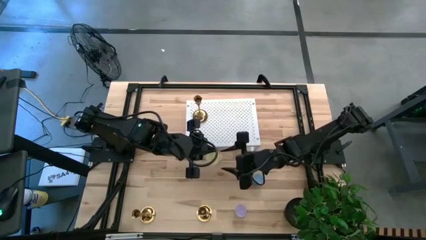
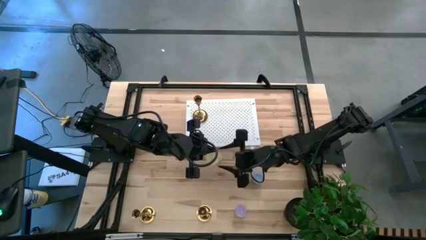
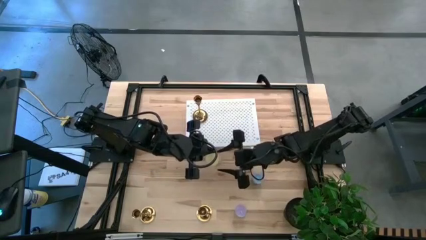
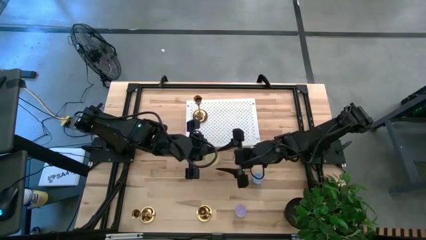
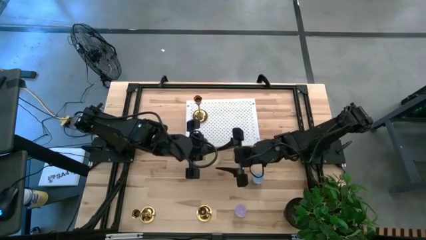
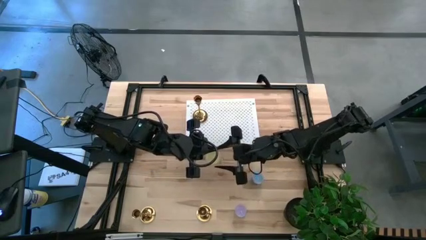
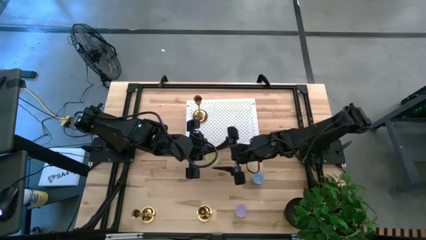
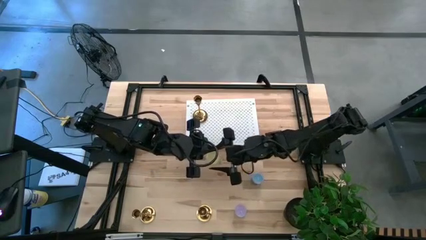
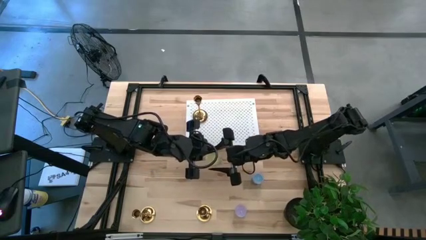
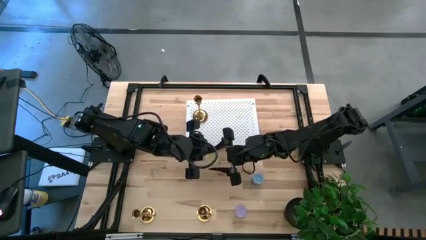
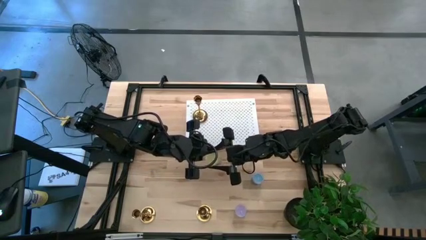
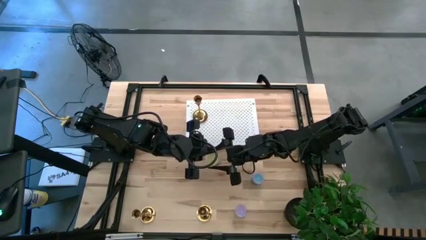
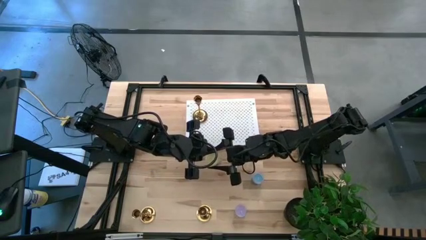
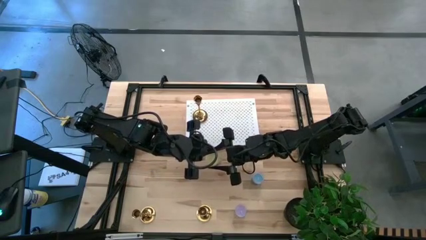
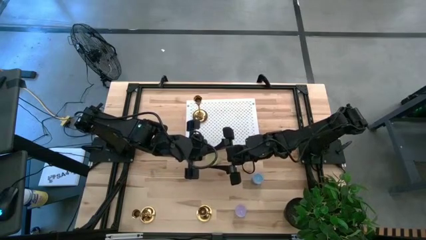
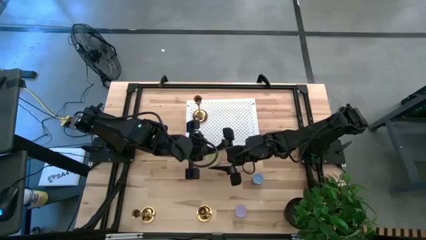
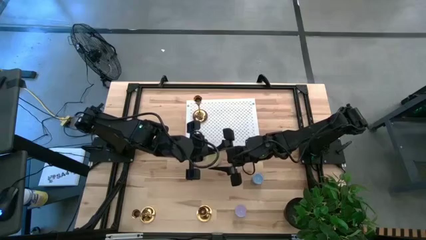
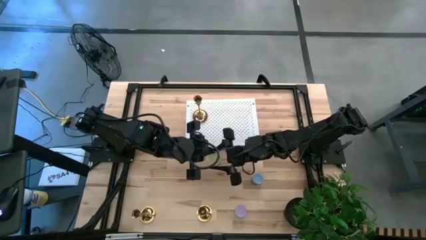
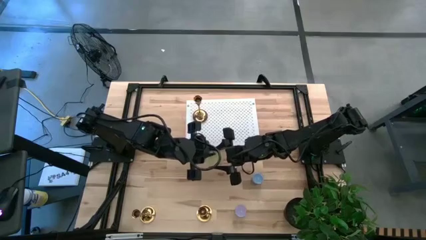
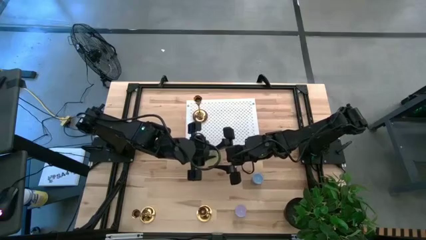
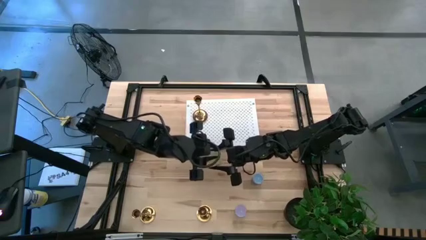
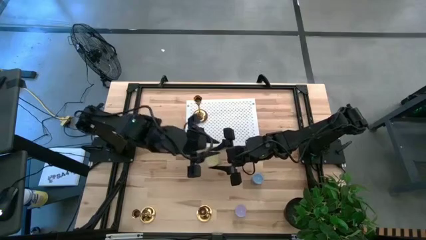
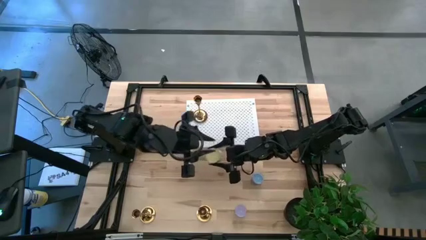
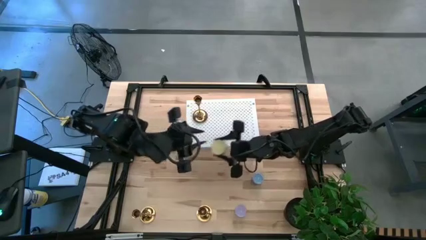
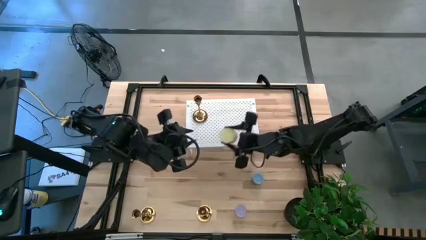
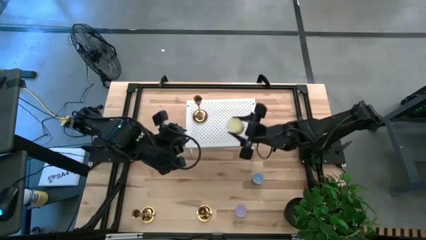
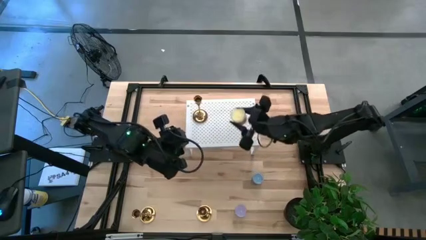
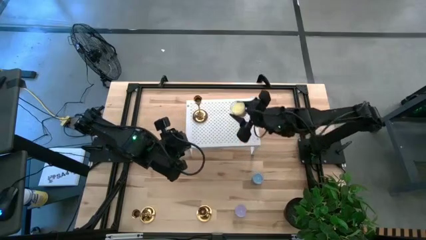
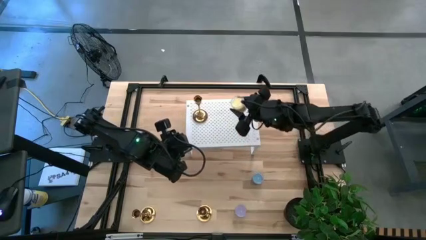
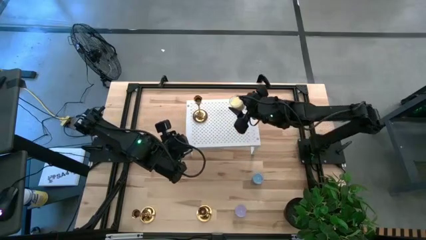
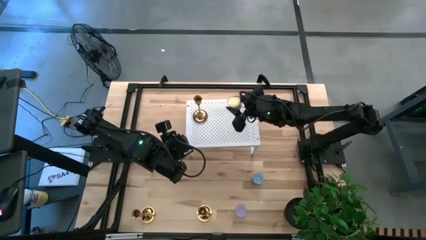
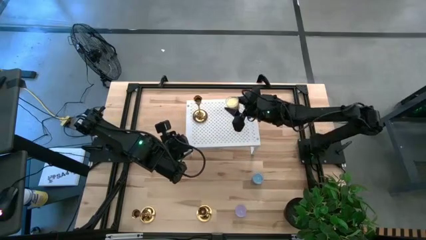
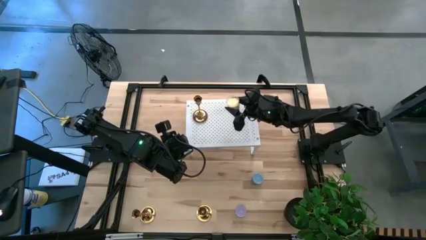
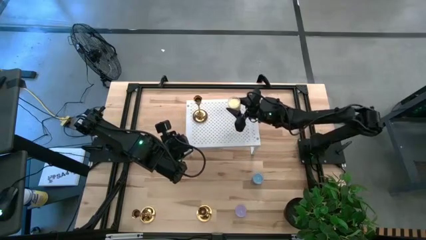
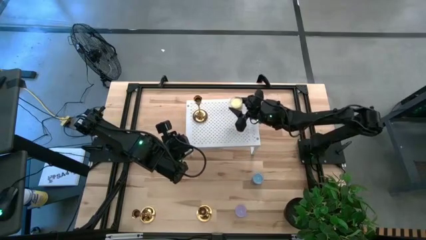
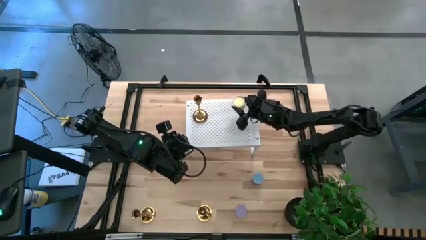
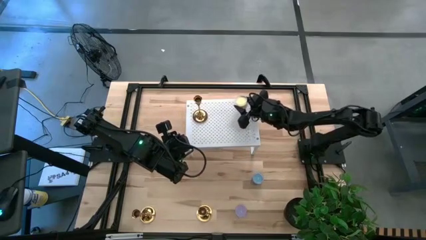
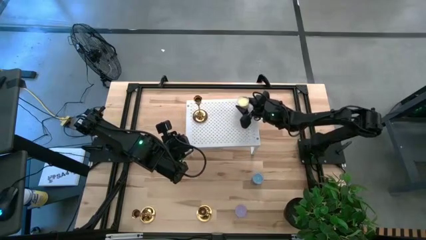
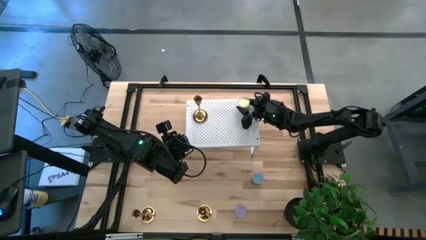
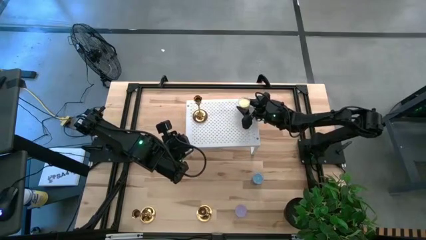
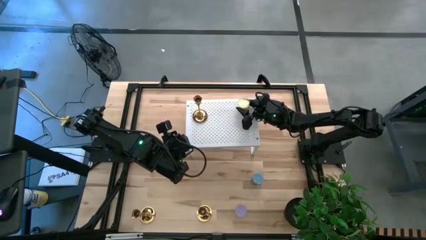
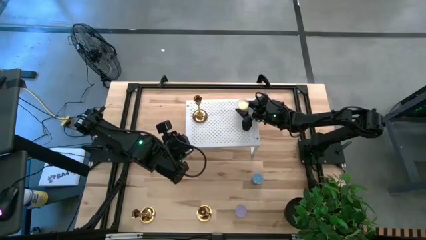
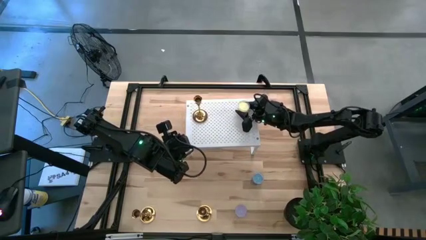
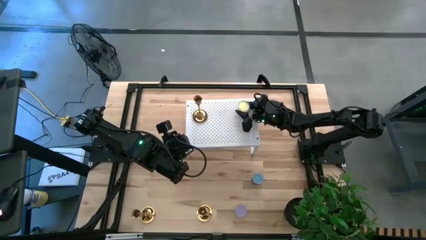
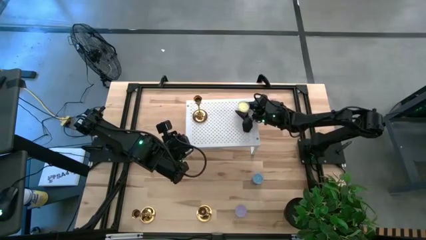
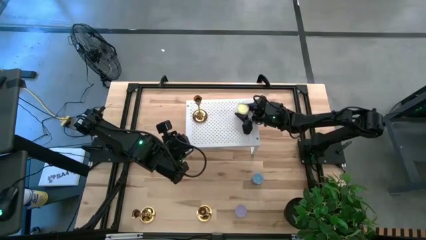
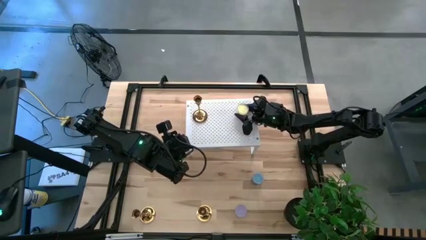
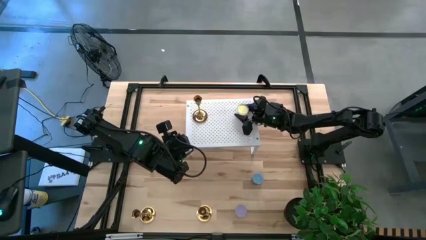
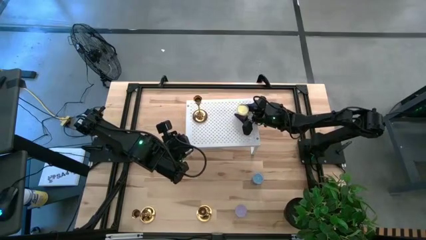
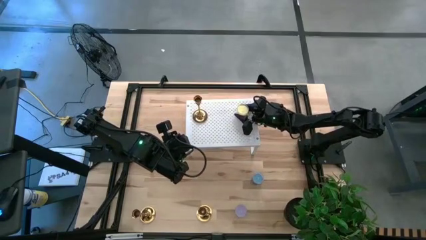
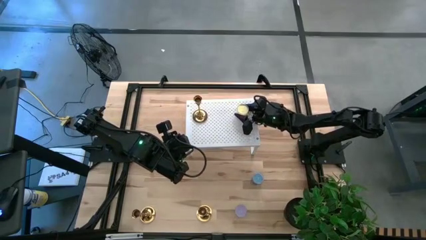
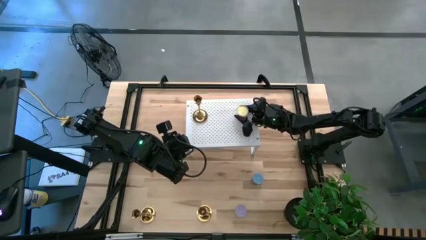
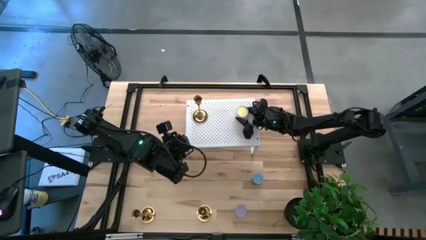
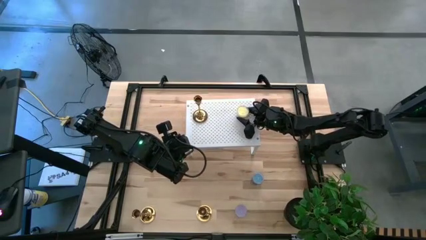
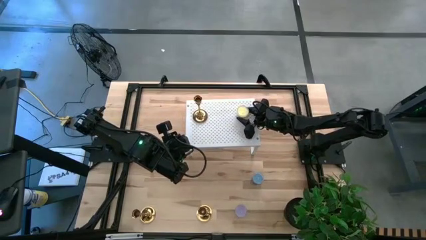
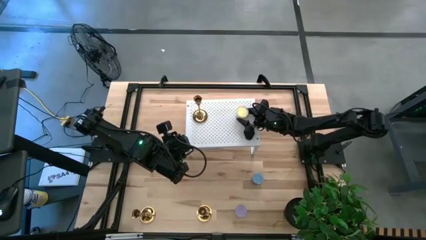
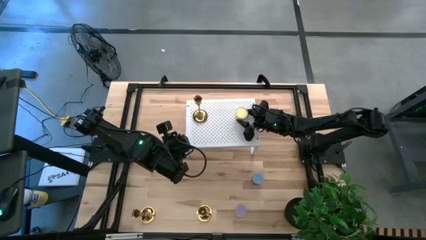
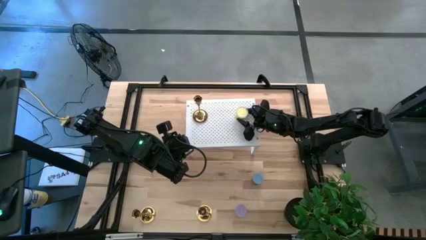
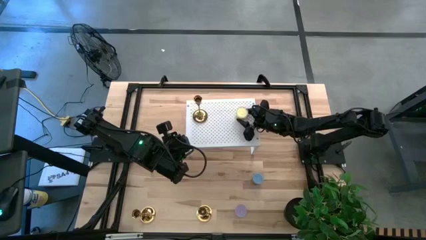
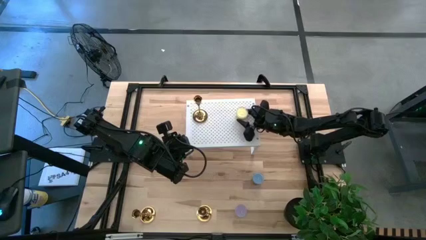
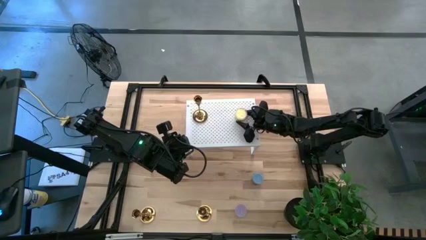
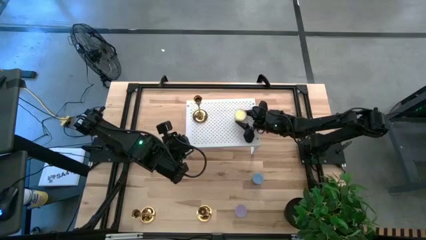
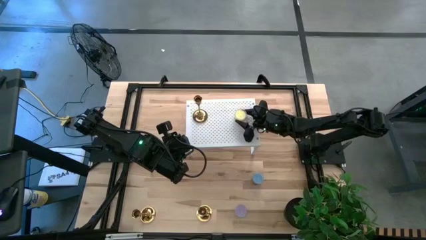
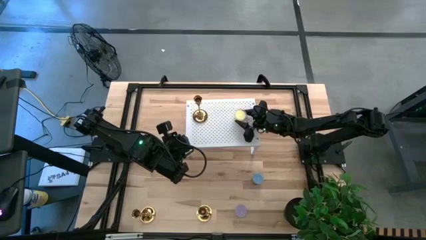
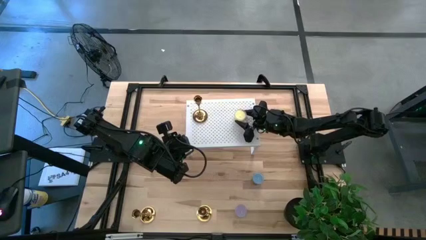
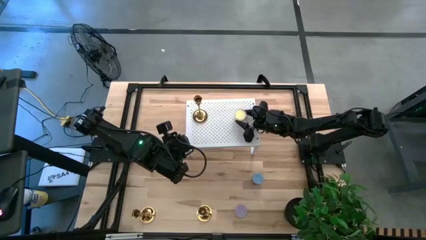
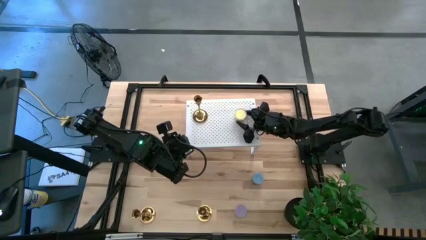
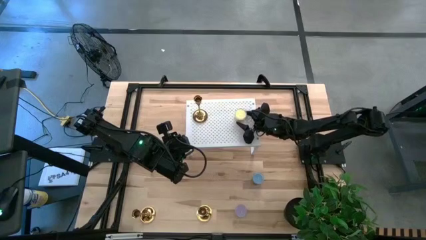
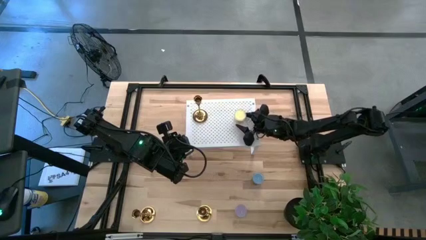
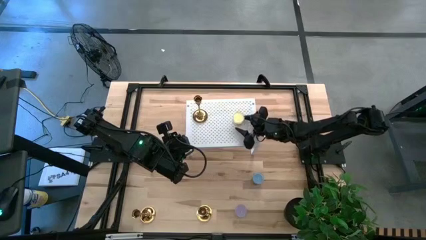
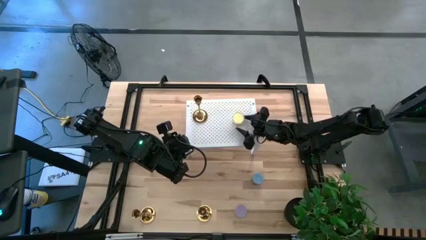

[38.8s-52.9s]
Task: Pick & Place candle stick holders
Put the yellow scented candle on the shelf
